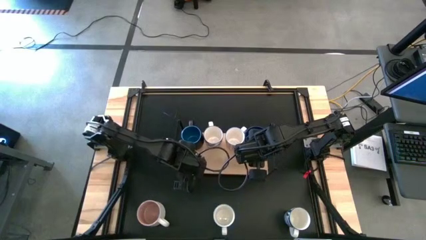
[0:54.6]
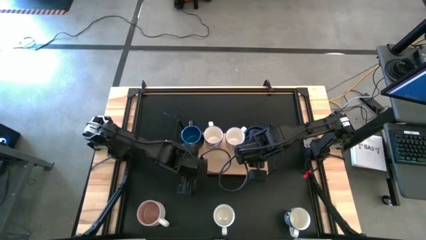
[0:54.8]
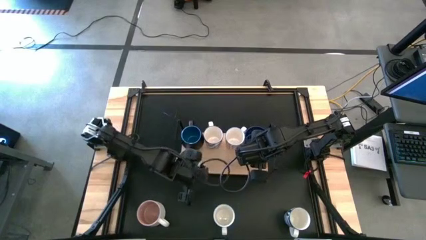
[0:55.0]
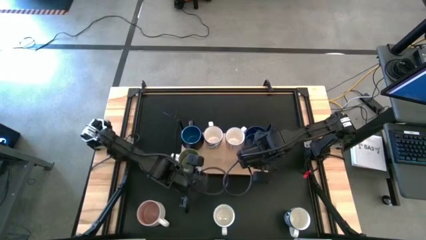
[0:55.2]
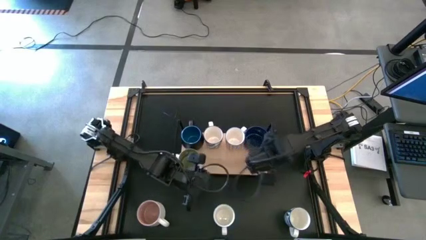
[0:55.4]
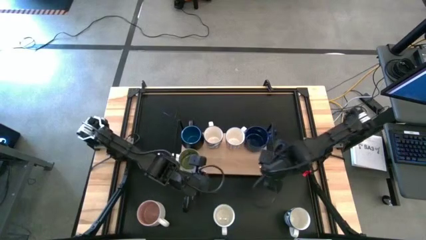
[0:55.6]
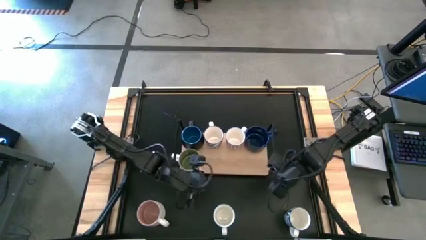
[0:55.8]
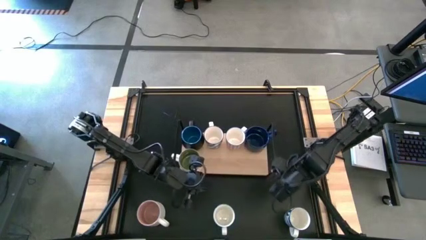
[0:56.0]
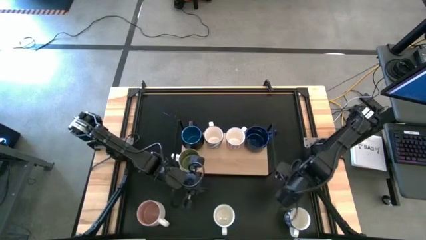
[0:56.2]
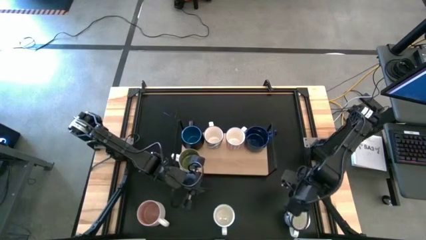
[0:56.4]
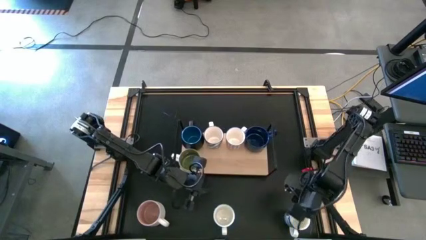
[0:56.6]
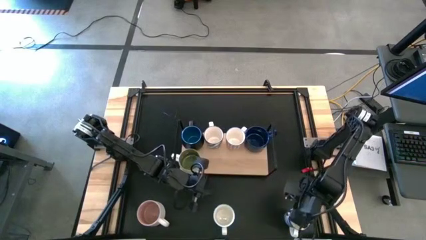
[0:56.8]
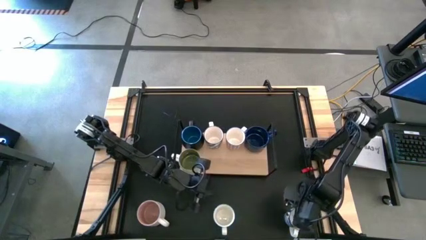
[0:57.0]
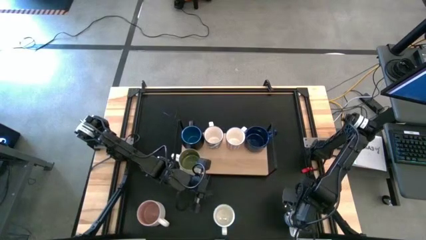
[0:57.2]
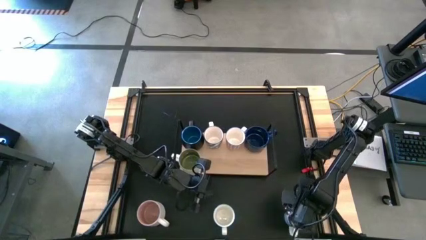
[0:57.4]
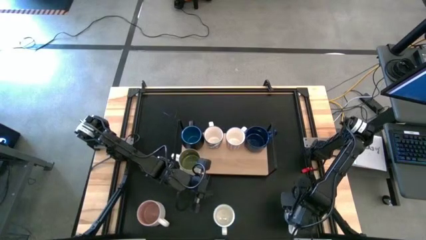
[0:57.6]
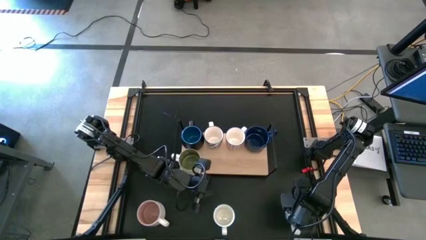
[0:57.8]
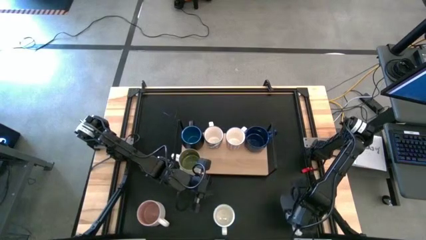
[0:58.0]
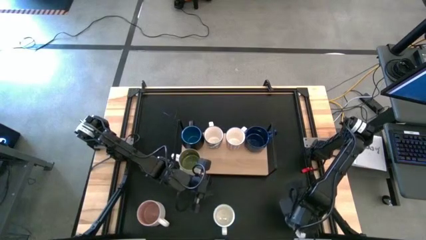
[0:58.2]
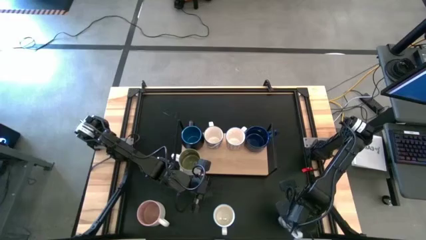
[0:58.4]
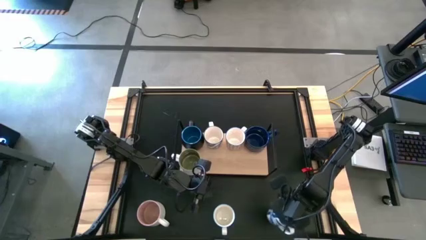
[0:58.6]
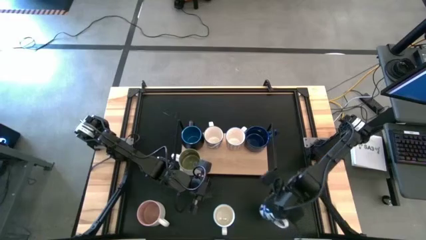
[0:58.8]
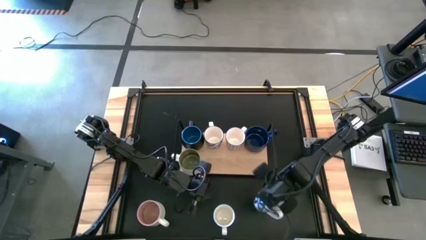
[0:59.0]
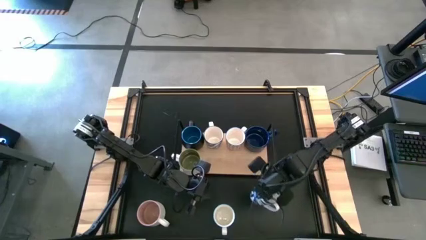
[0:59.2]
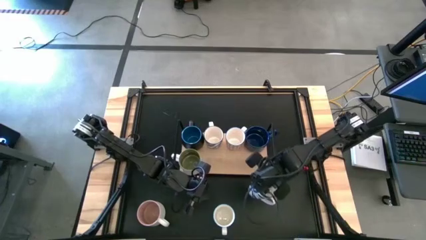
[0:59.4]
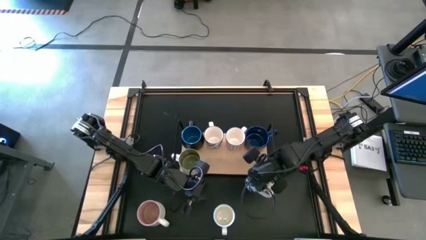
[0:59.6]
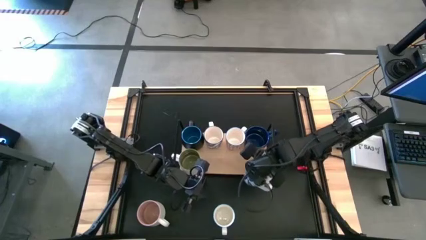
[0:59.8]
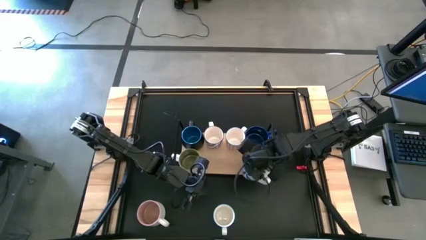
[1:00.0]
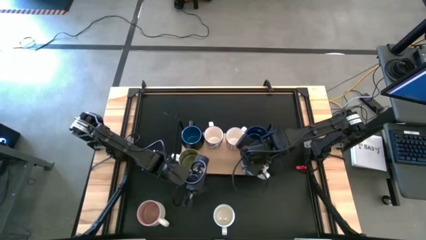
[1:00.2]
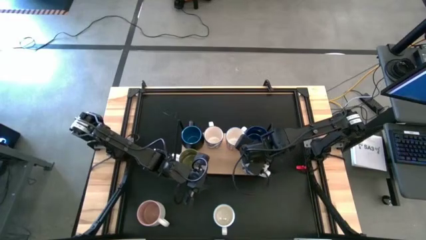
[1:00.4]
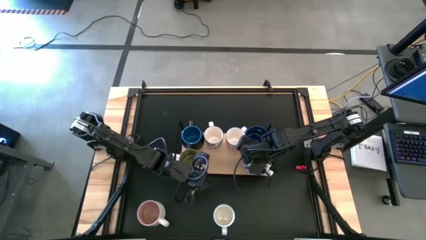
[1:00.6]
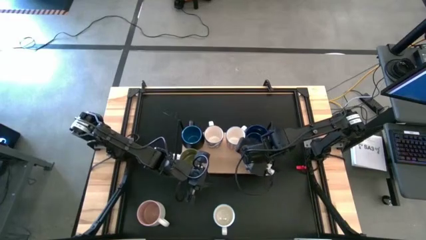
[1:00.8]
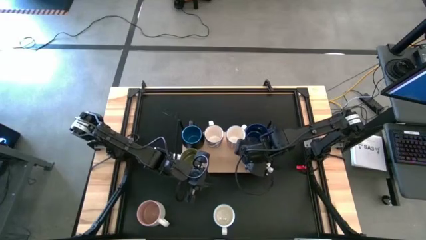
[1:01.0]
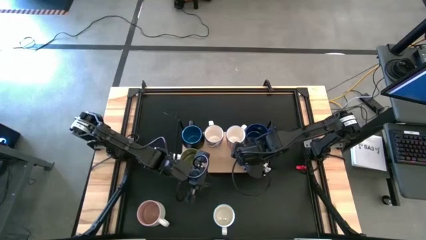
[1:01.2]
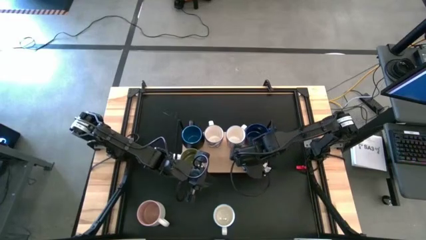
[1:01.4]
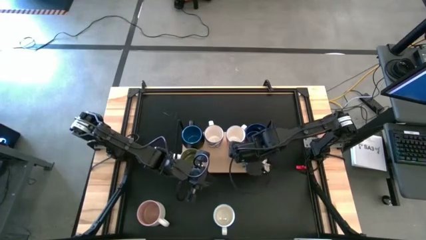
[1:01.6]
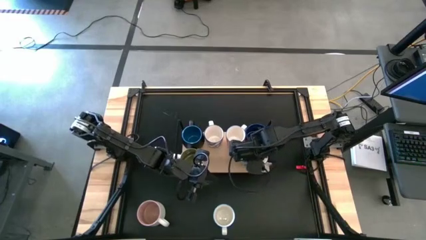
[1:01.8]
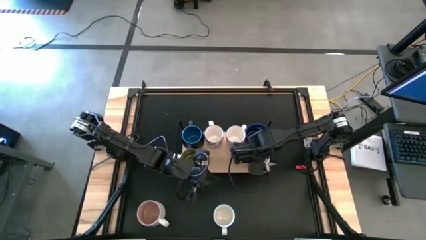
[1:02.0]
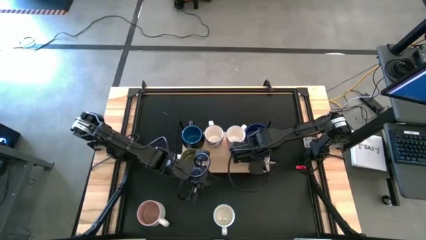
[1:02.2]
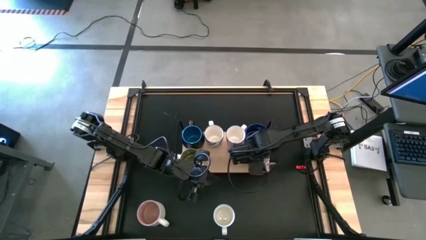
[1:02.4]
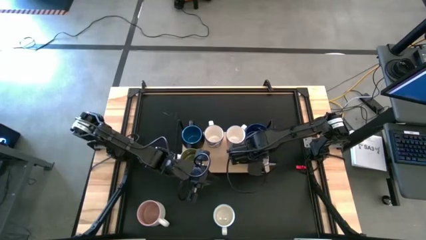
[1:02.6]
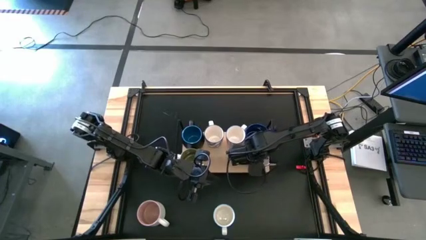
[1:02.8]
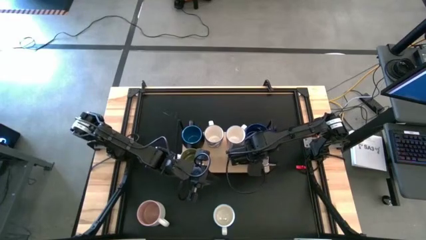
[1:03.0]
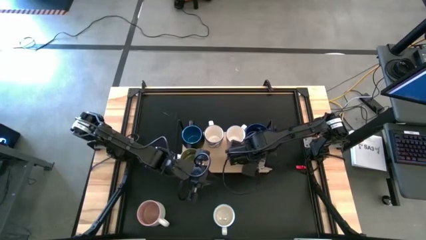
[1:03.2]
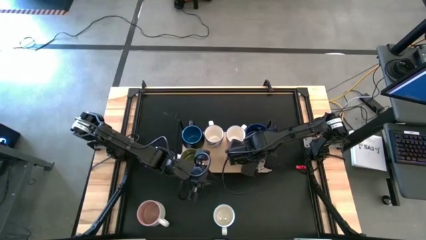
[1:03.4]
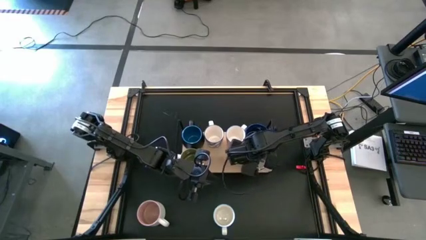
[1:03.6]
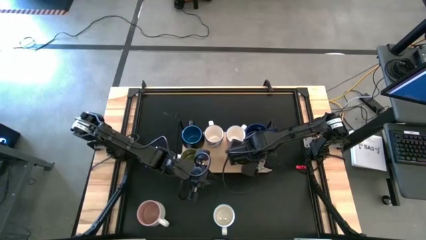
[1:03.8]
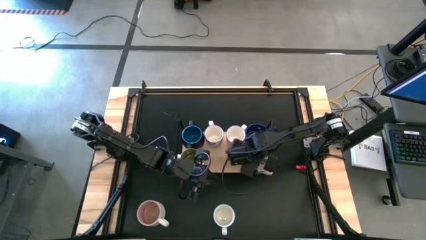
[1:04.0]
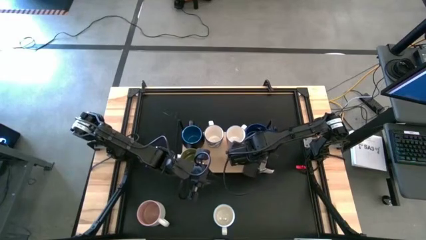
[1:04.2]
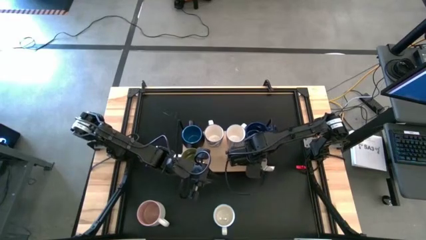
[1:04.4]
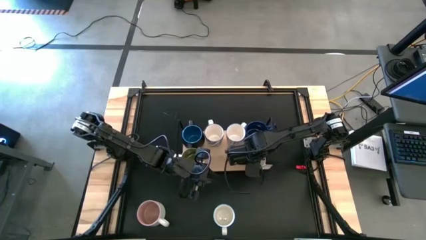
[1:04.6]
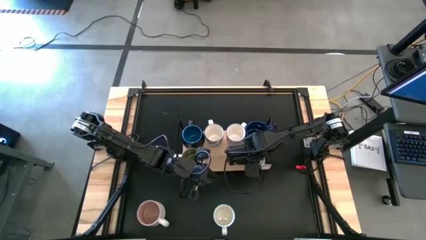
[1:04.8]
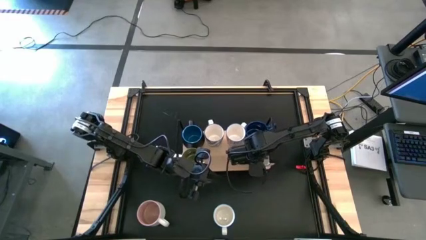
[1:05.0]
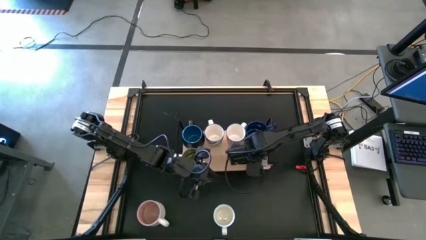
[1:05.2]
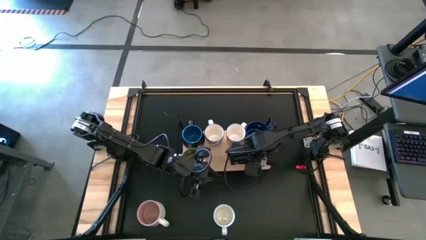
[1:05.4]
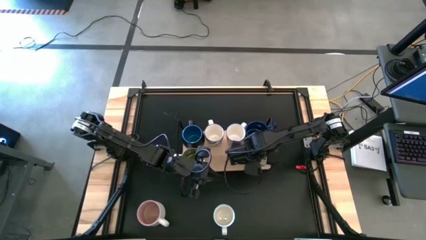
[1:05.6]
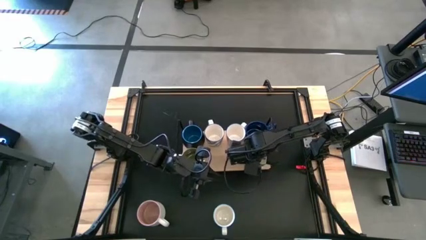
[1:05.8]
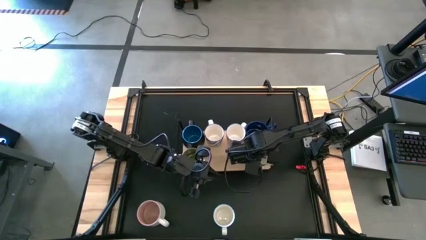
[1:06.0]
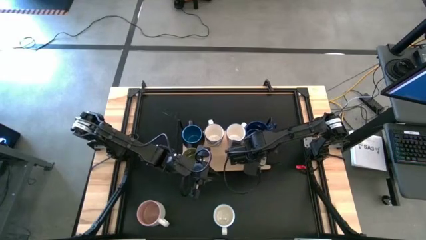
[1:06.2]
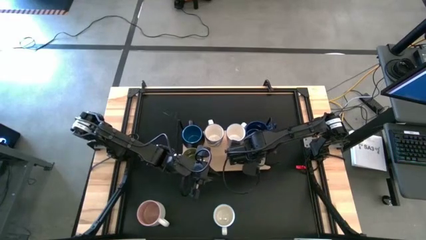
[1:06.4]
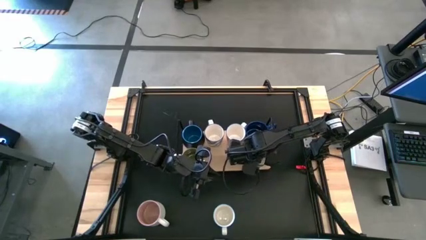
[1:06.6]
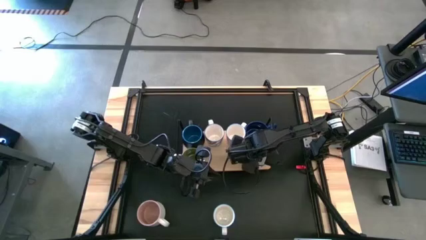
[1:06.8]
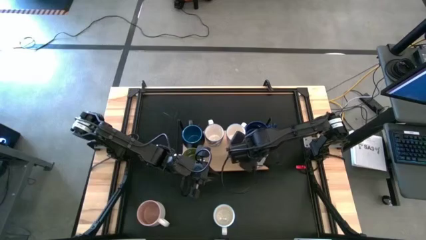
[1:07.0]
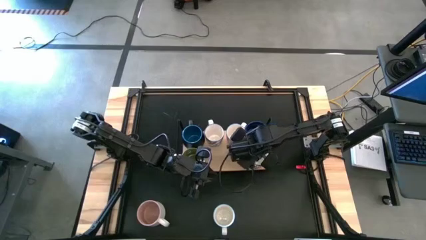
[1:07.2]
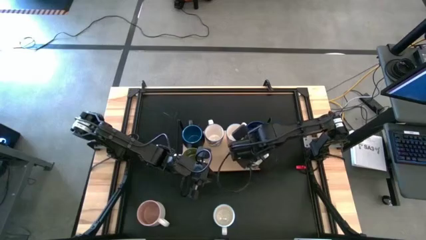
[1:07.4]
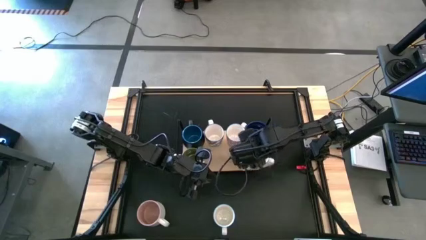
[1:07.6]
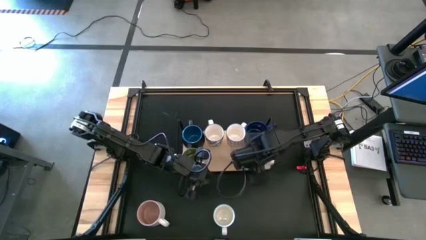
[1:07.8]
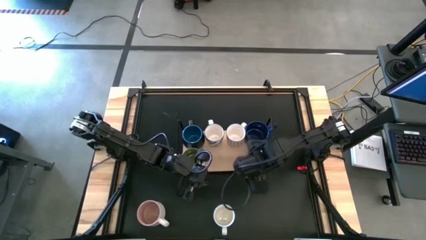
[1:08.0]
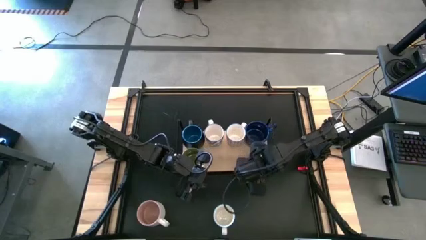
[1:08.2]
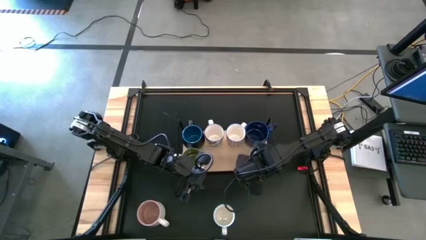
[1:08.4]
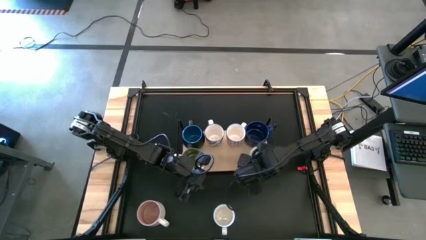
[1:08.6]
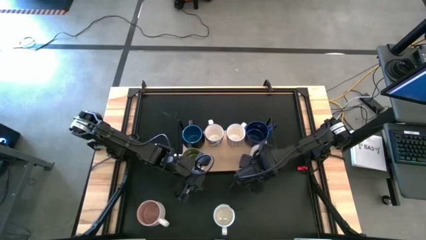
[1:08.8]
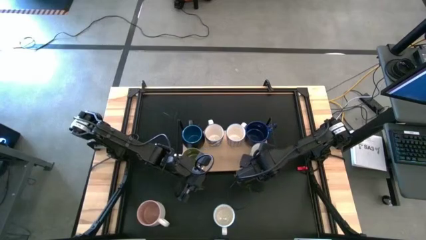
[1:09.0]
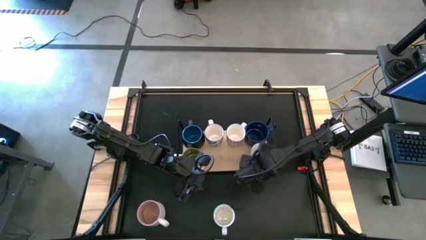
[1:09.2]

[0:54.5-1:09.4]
Task: Place coffee mugs
Put the blue patterned mug on the shelf
